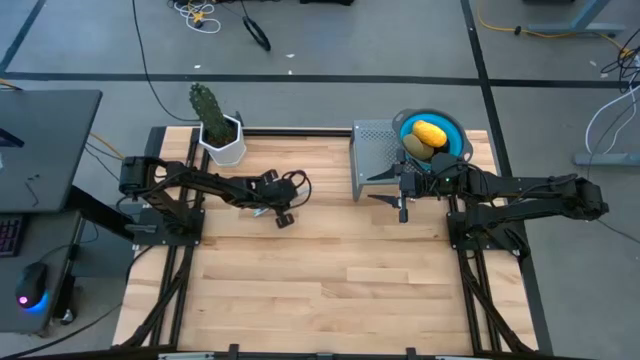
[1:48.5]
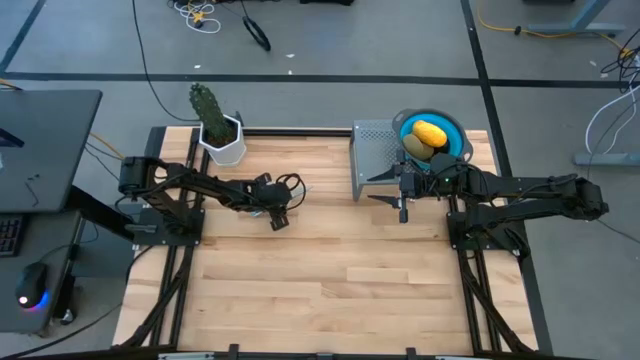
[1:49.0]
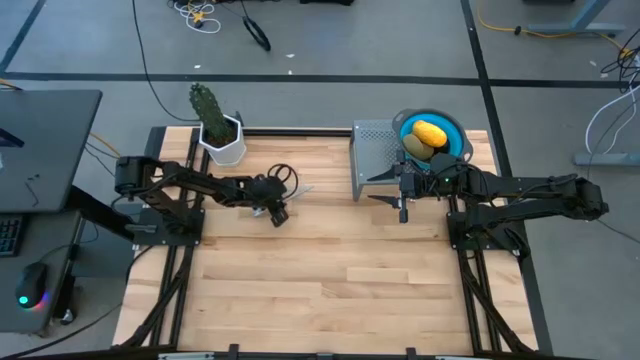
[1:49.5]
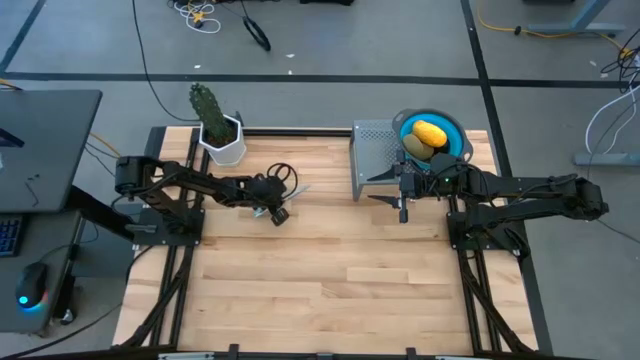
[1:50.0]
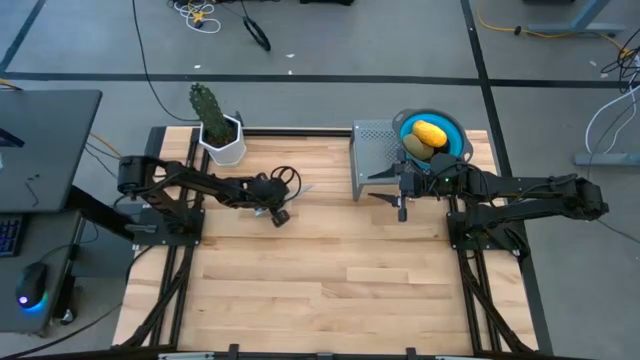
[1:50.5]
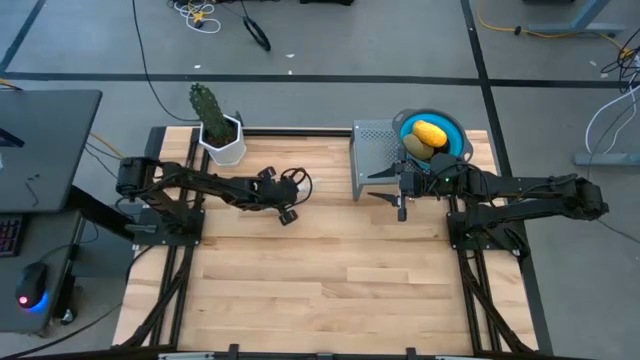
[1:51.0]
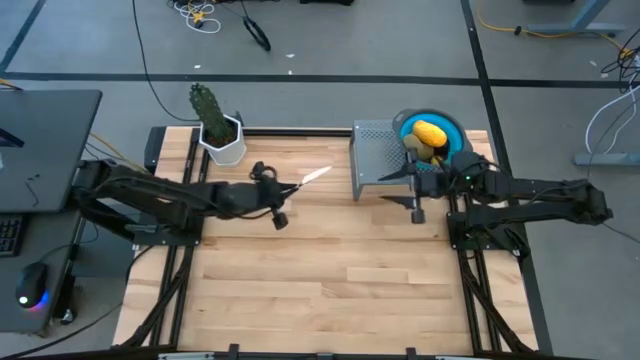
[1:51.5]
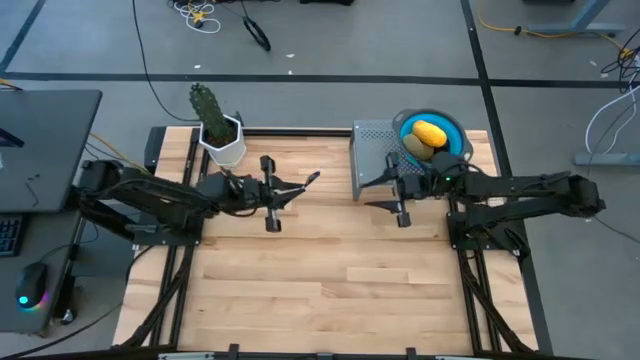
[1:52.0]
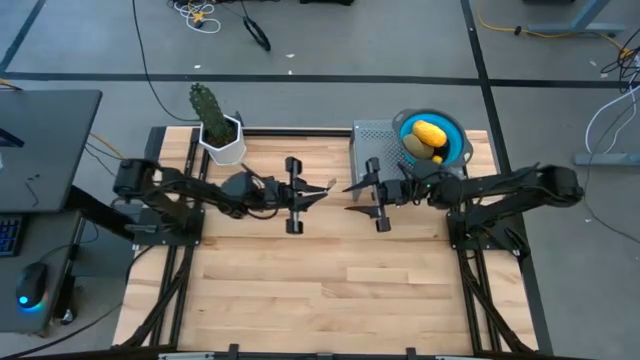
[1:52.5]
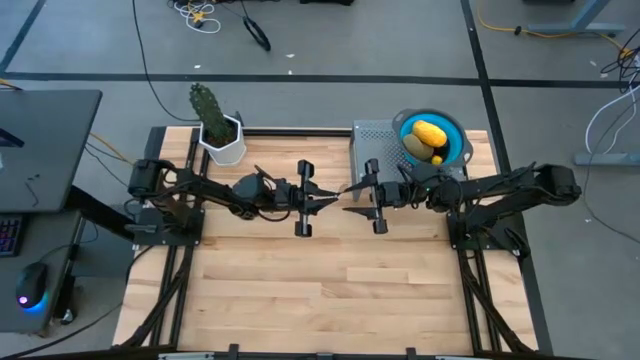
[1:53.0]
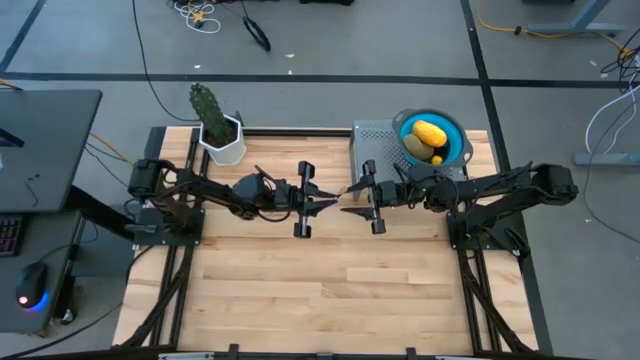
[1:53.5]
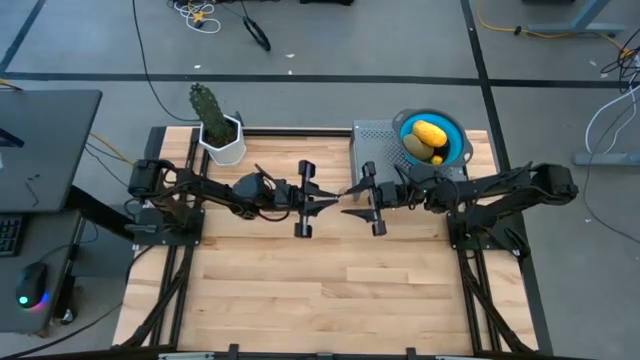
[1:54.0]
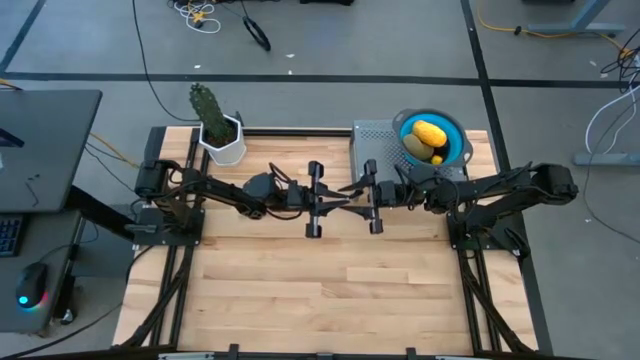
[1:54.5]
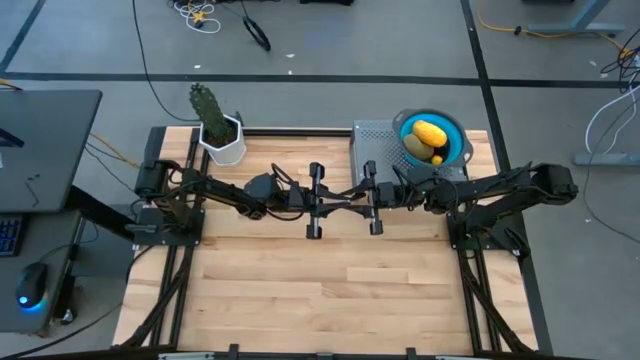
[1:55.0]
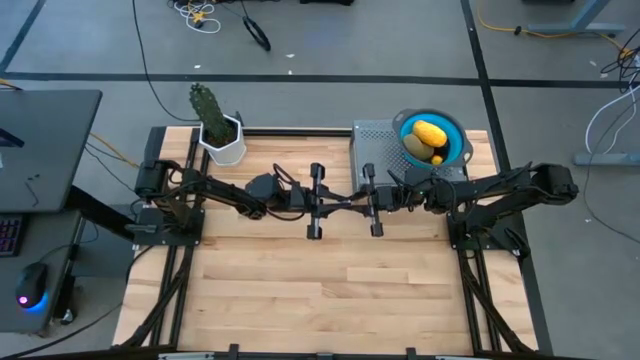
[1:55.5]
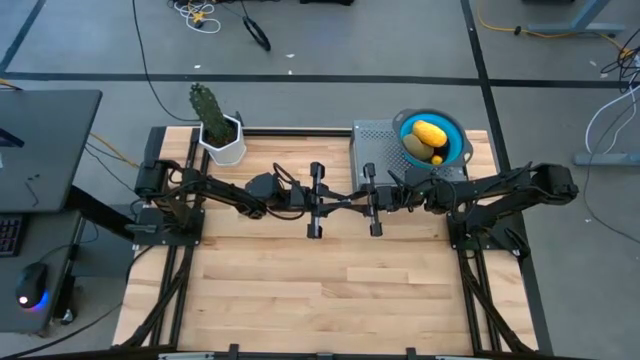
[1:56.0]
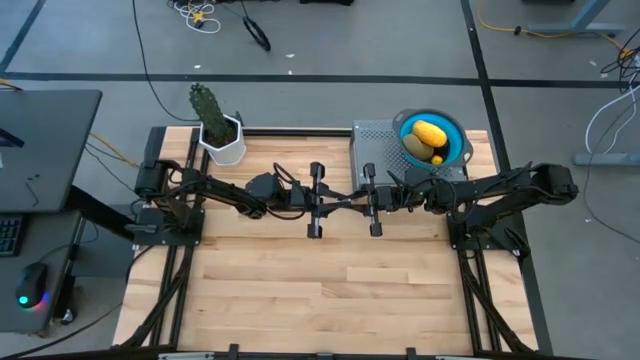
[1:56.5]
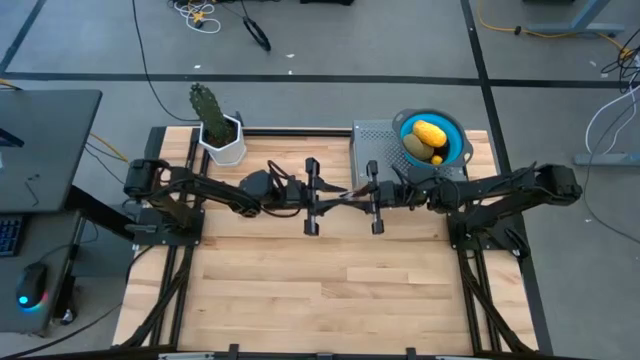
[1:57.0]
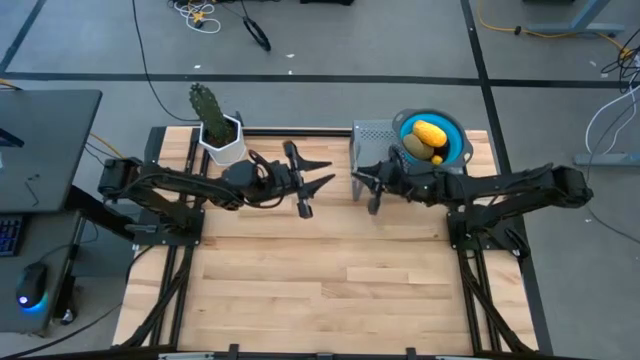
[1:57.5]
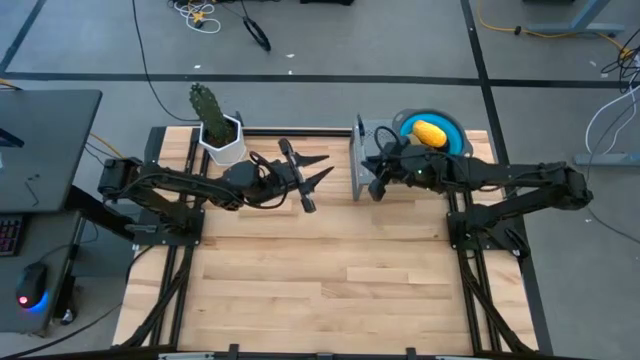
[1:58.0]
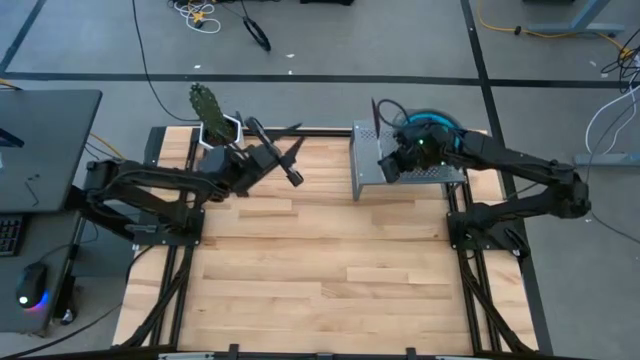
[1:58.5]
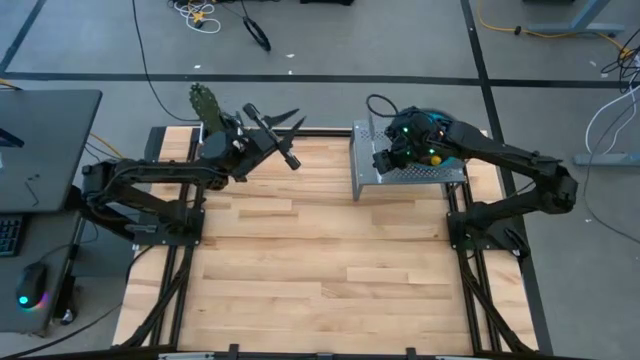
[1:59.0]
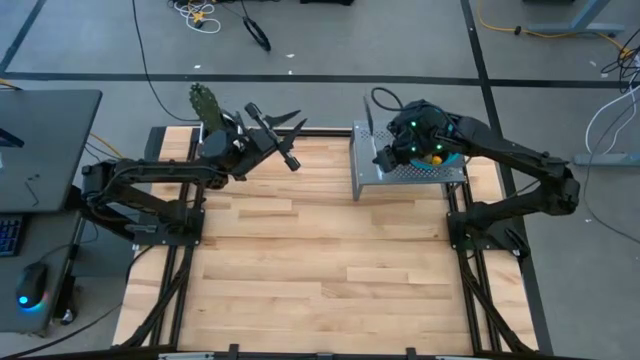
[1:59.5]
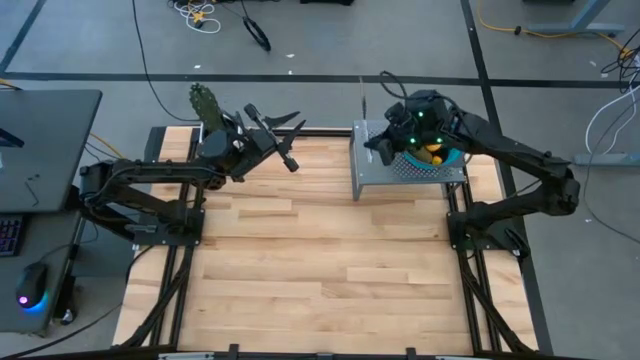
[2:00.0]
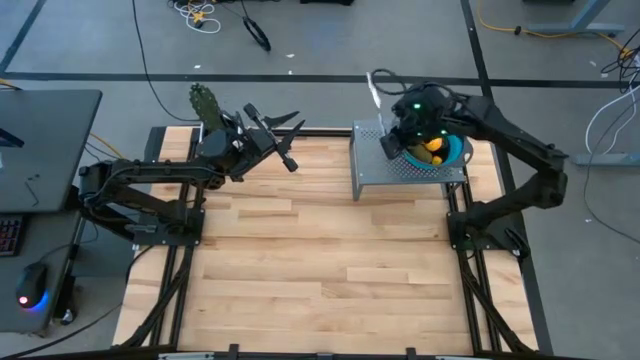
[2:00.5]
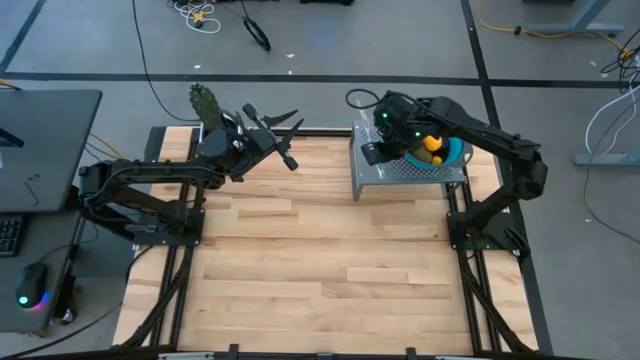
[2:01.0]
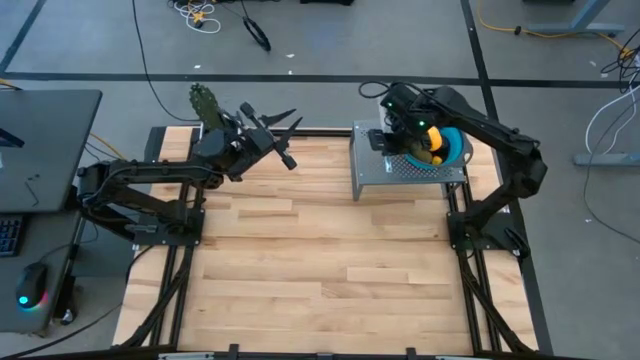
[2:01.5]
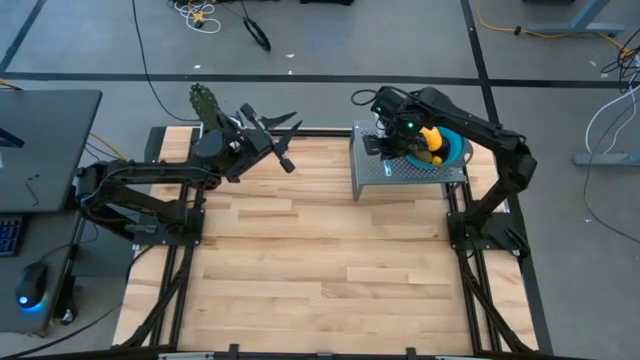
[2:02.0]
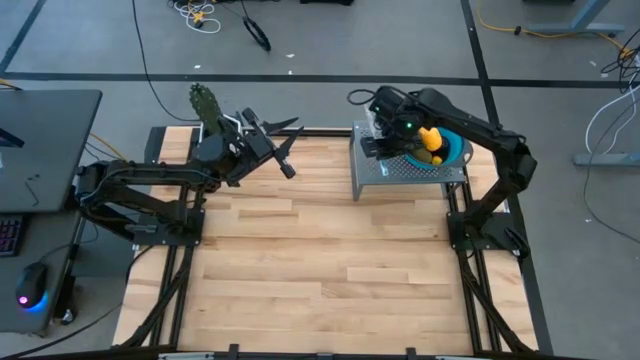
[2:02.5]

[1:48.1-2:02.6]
Task: Pick & Place Fruit
Put the knife to the left of the blue strainer bowl on the shelf

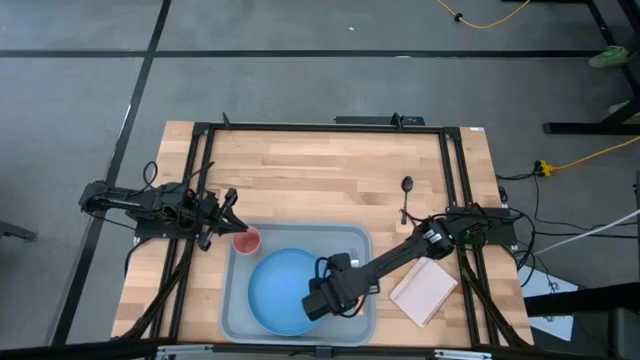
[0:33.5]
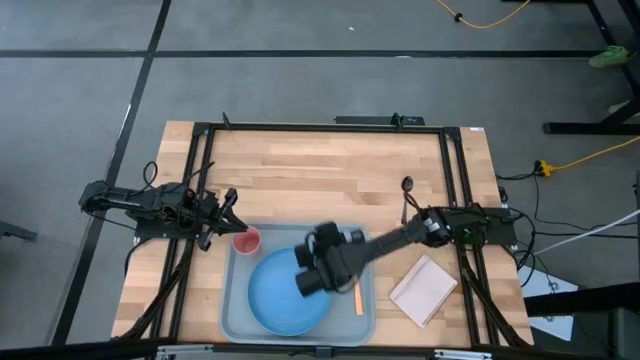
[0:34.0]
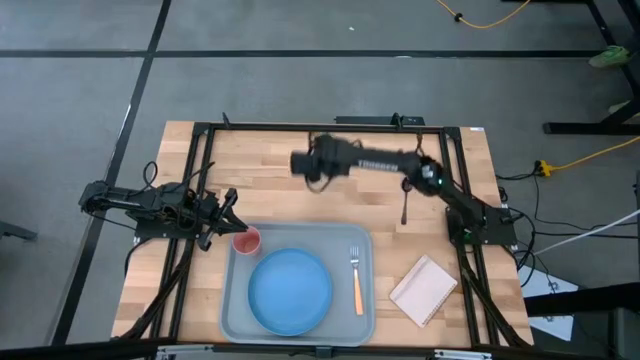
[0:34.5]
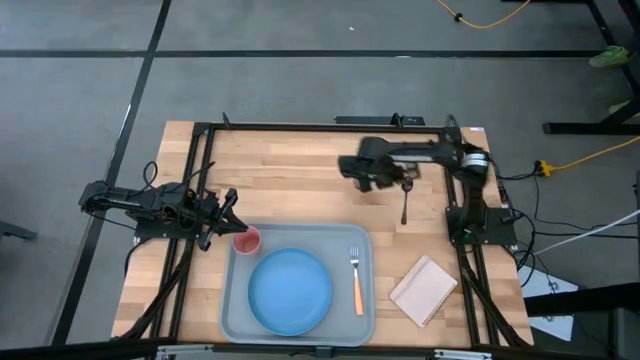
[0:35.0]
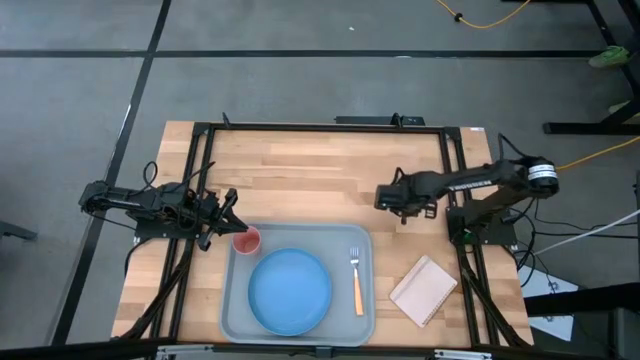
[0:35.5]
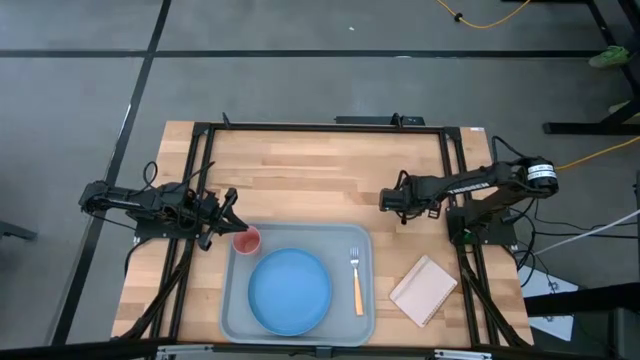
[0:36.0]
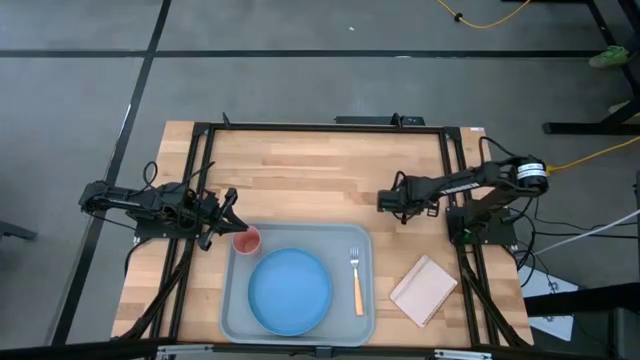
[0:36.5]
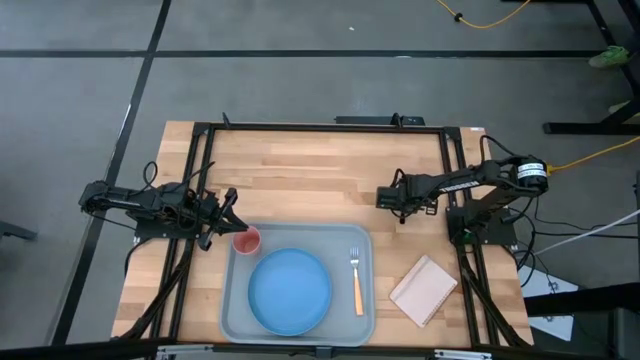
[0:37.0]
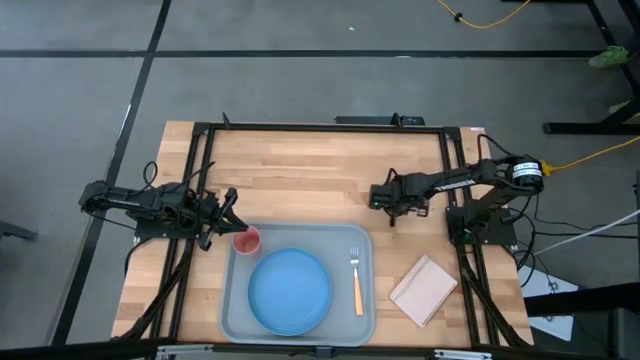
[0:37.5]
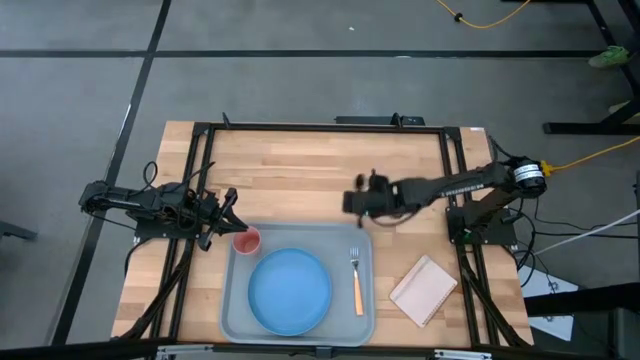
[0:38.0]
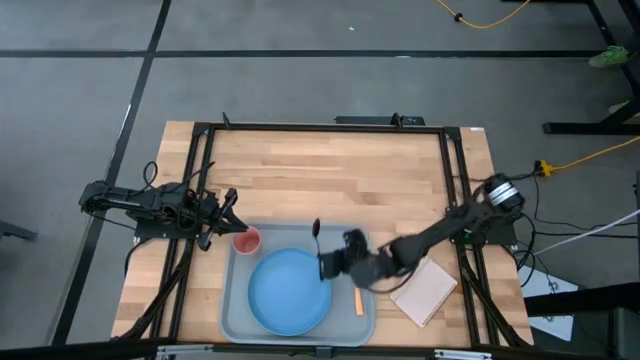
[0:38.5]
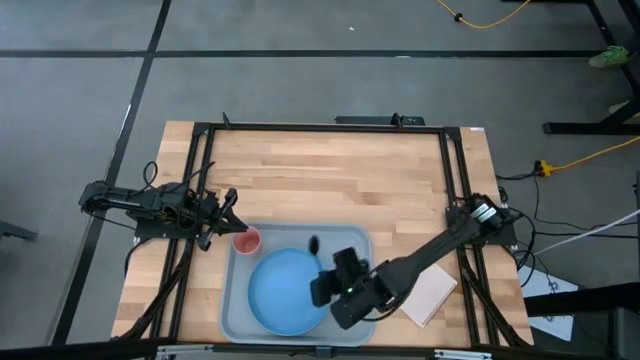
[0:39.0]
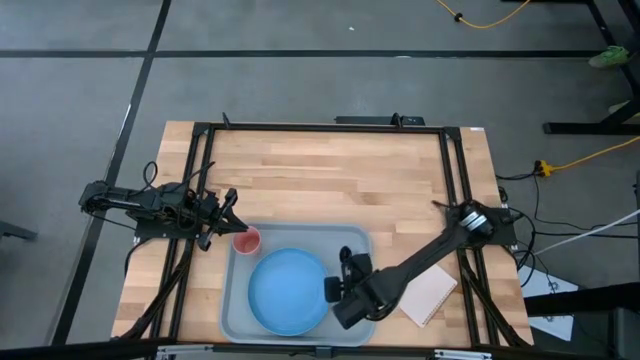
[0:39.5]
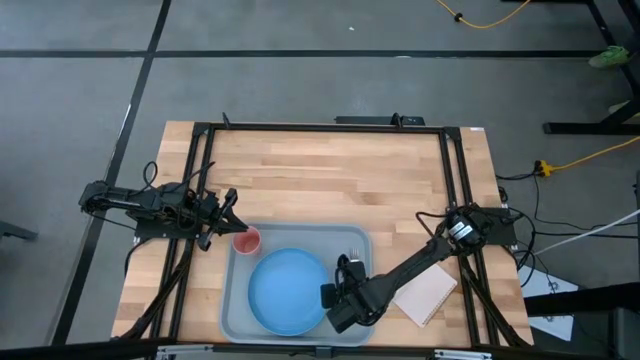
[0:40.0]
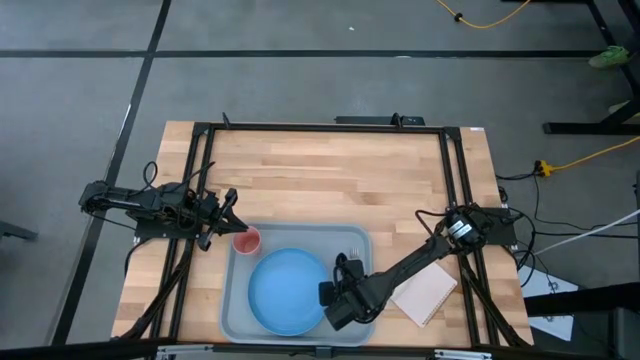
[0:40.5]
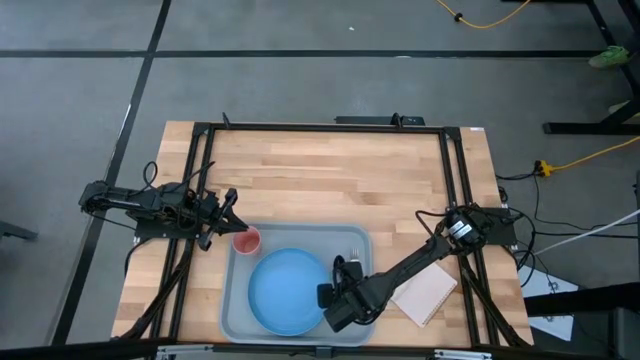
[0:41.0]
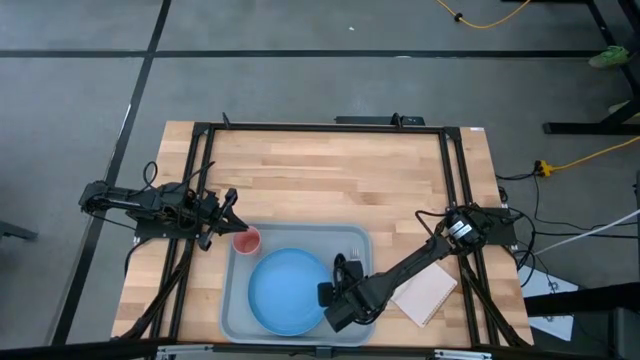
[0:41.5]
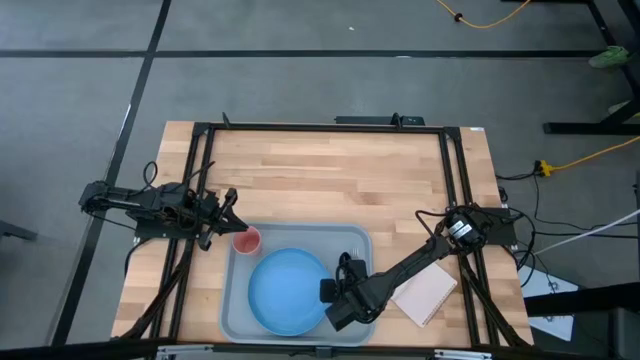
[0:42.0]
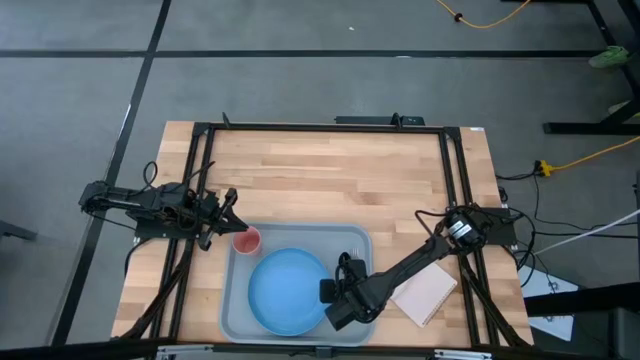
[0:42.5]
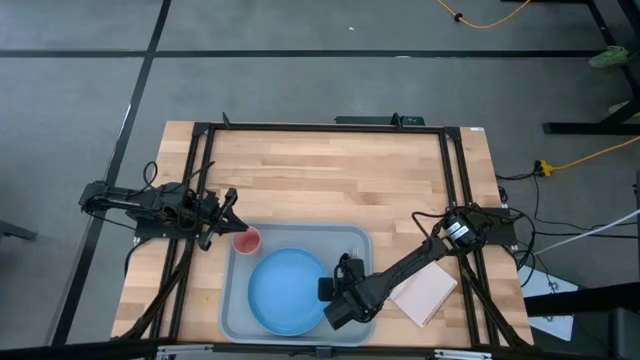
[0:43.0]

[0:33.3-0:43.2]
Task: Pick and place plate/cup/fork/spoon on tray
Put the black spoon to the right of the blue plate on the gray serving tray
